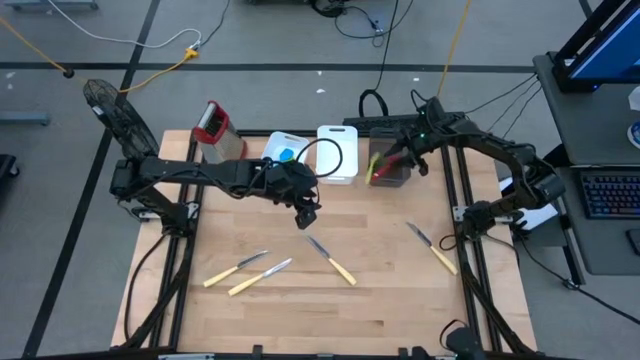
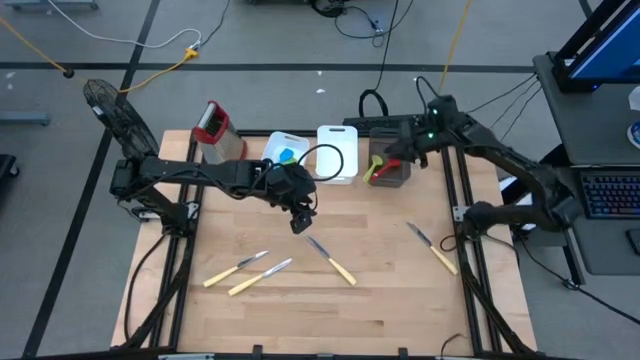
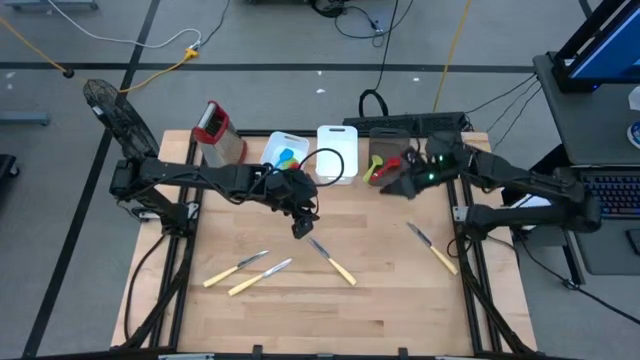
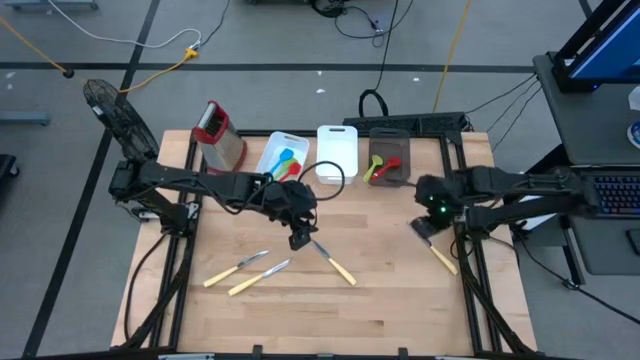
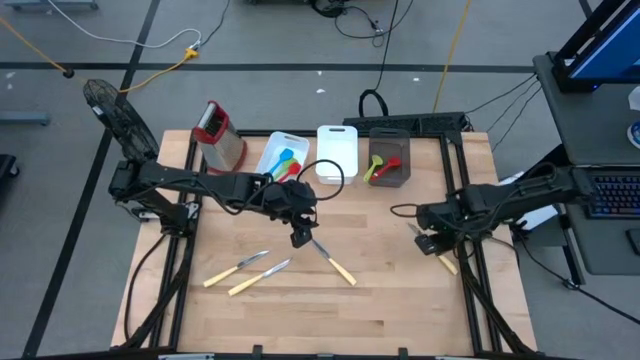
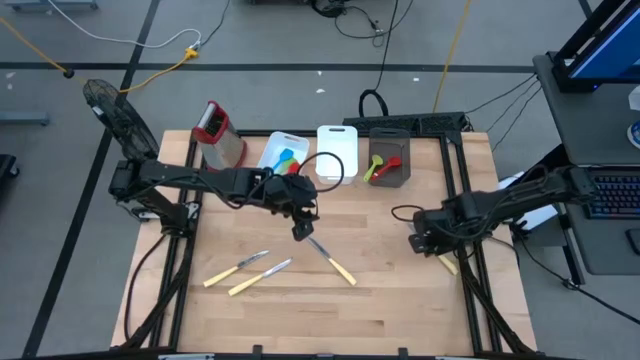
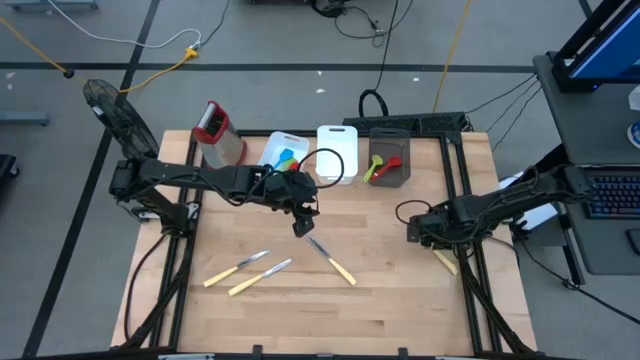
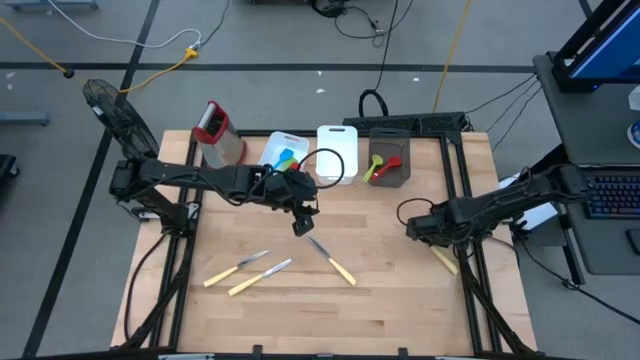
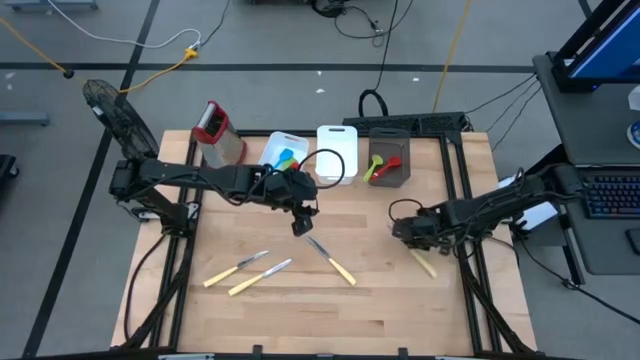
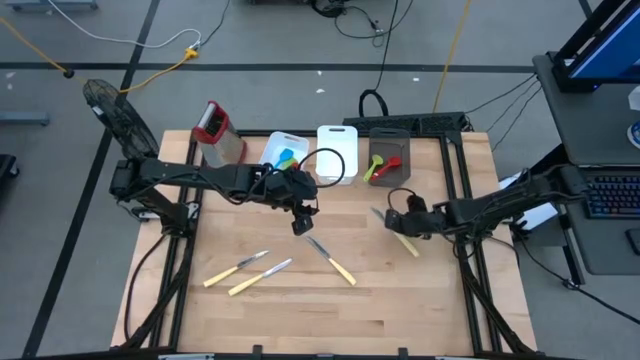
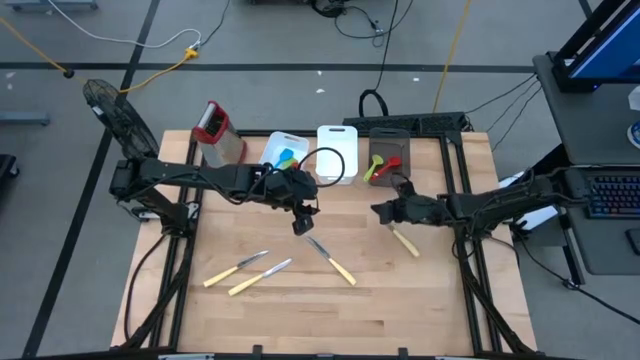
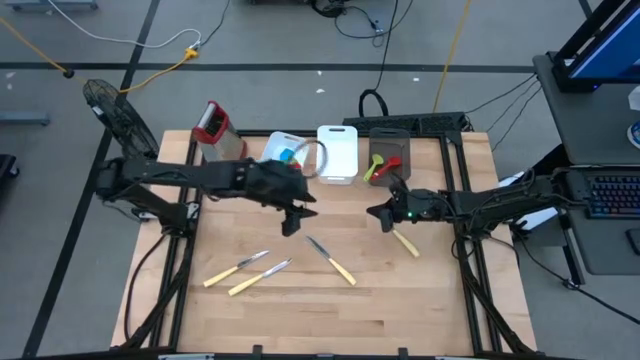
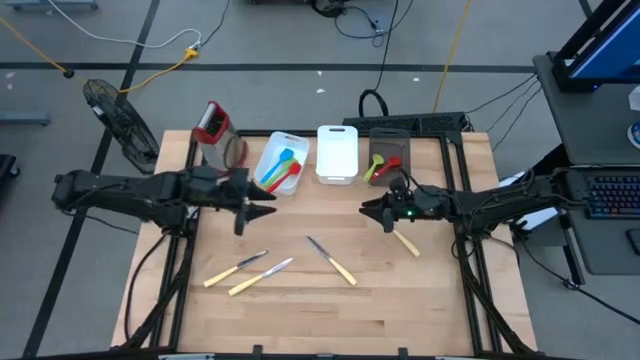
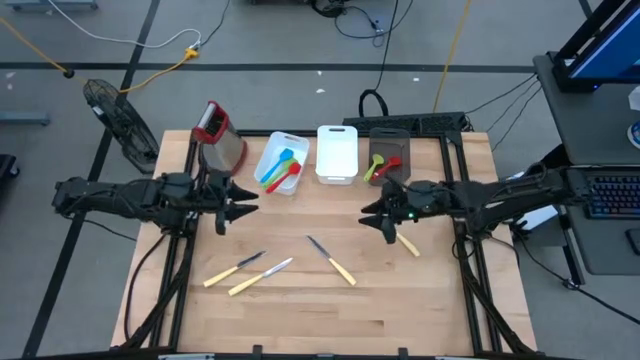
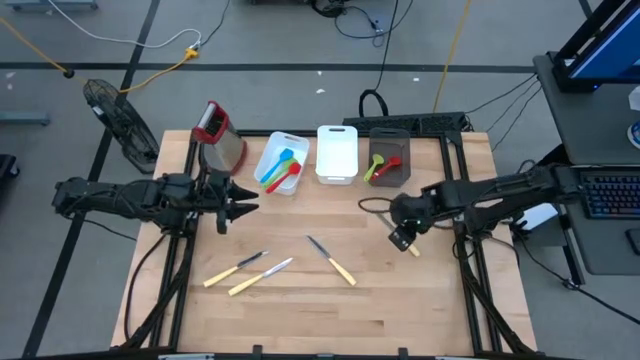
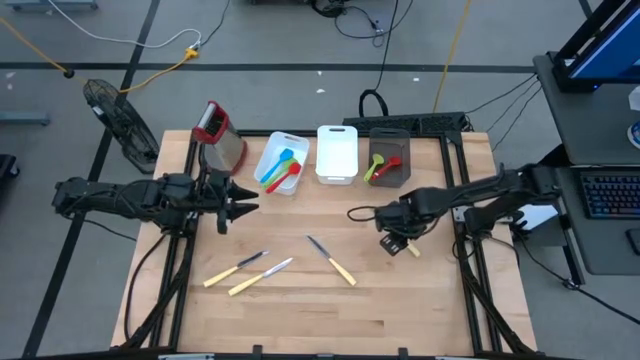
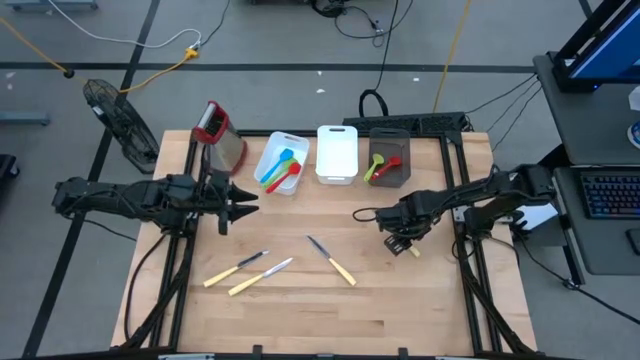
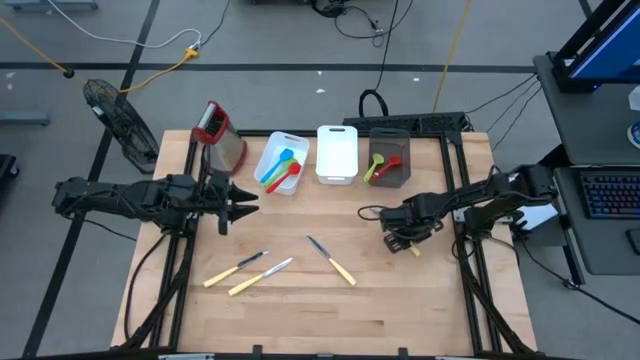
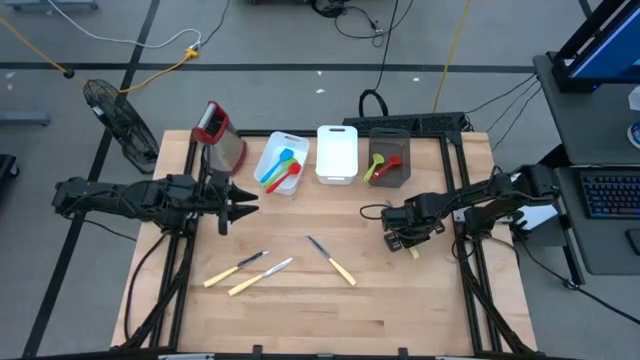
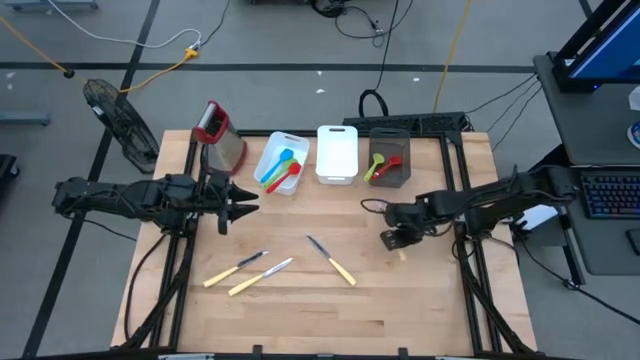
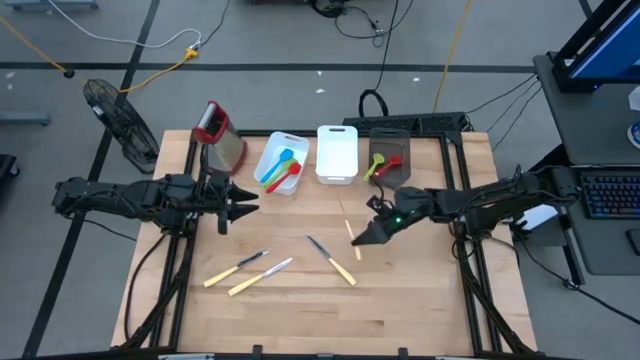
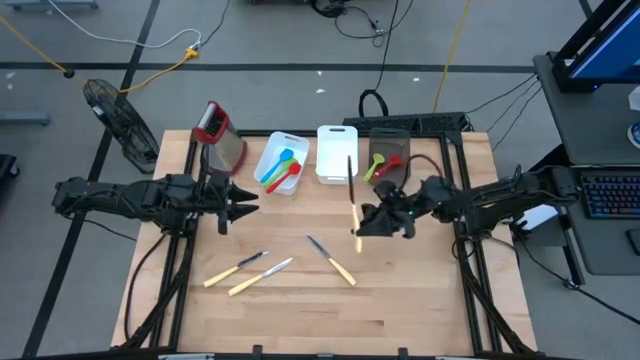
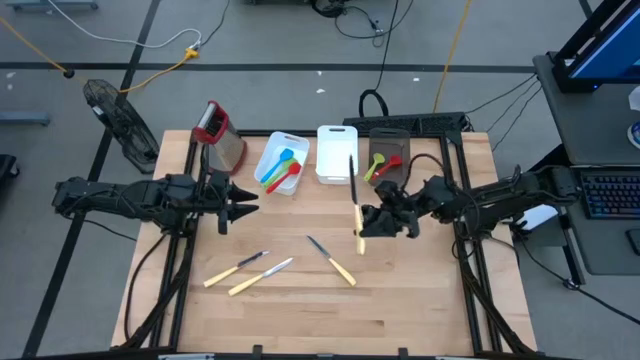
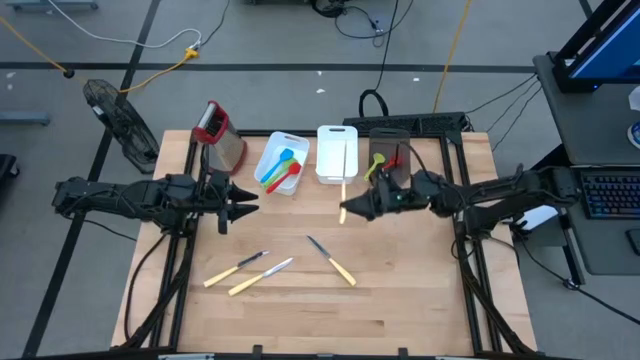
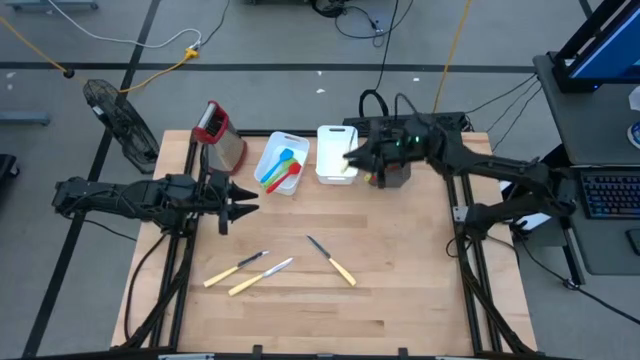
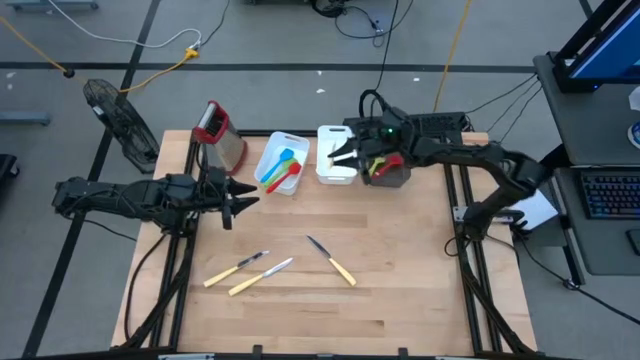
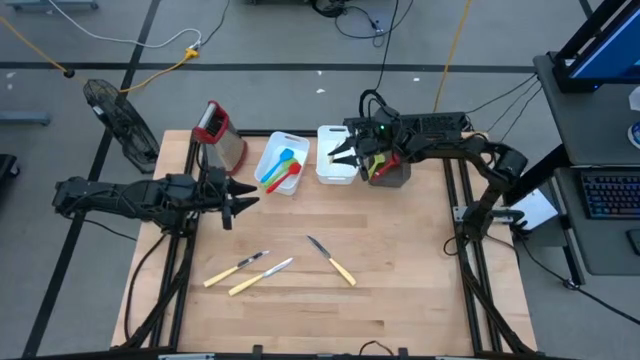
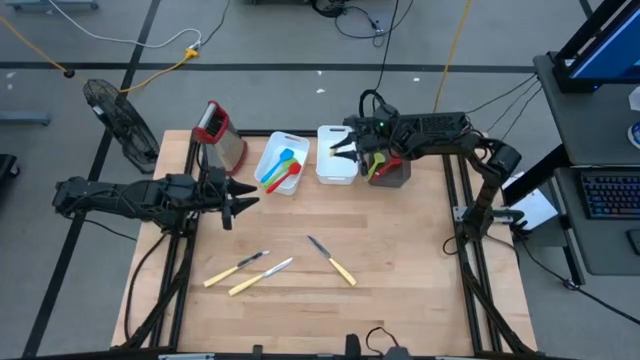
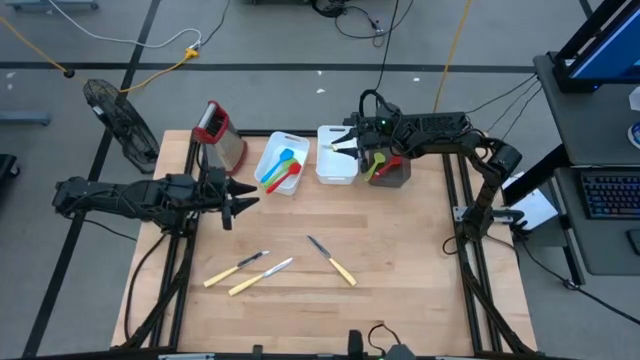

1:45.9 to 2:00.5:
Task: Pick & Place Kitchen Items
Put the yellow knife into the right white bin

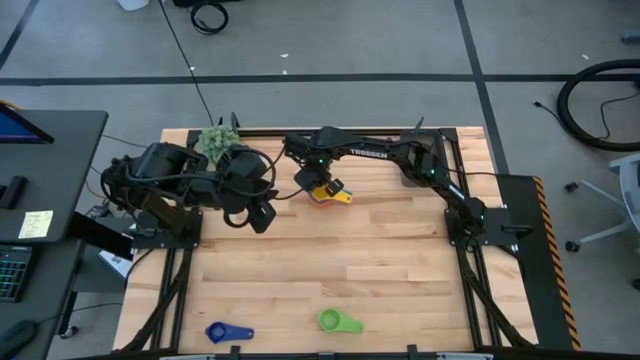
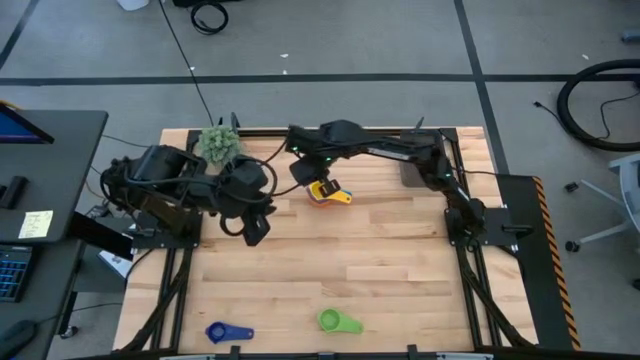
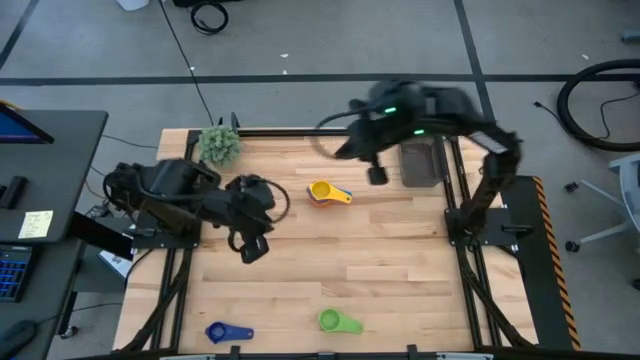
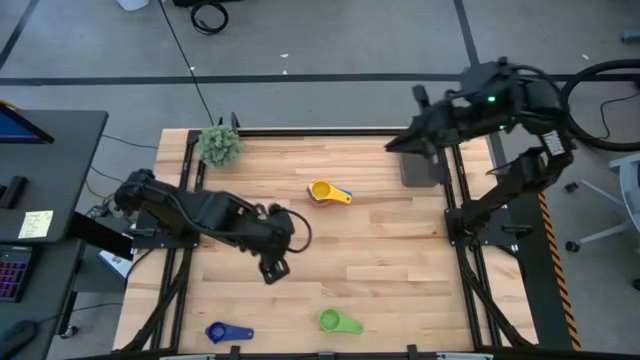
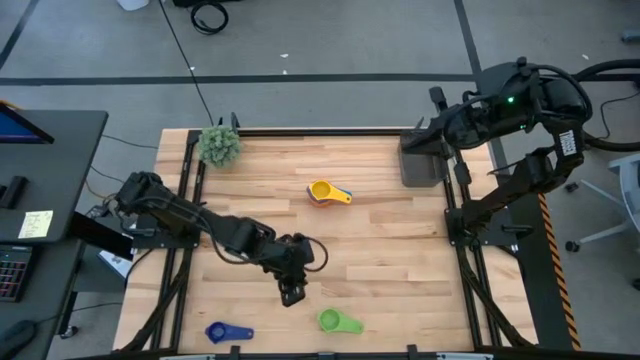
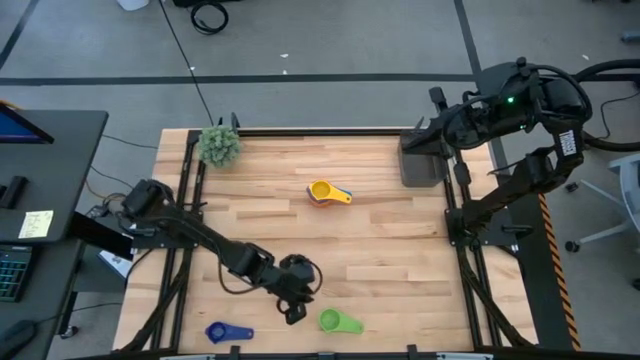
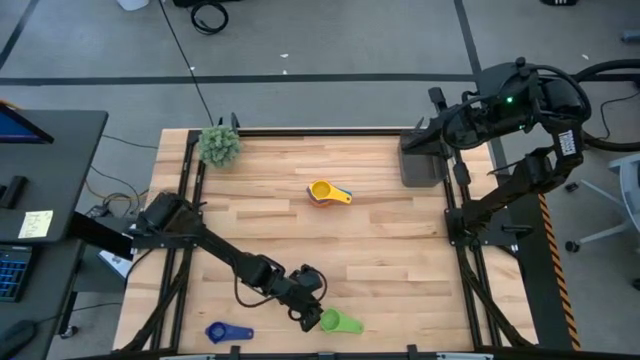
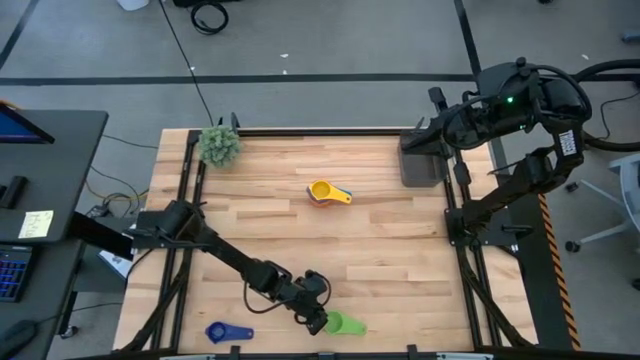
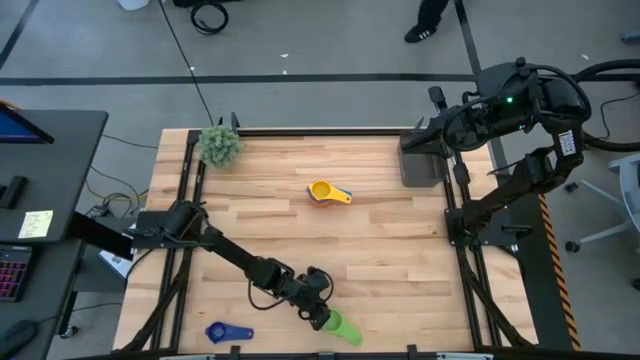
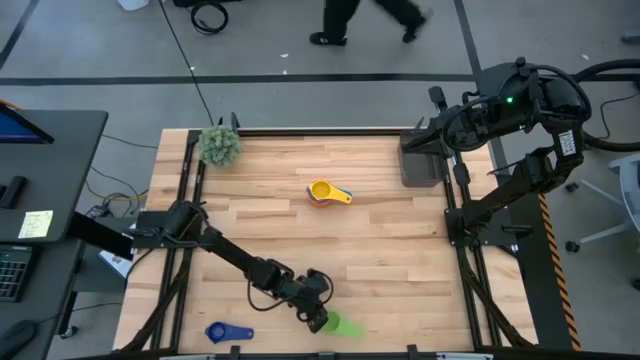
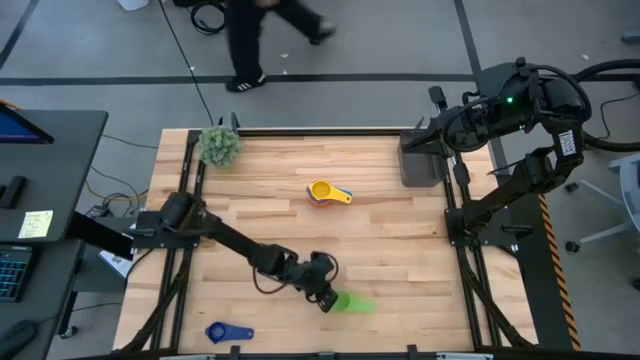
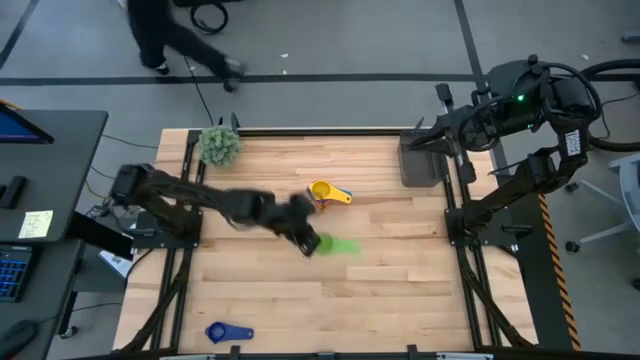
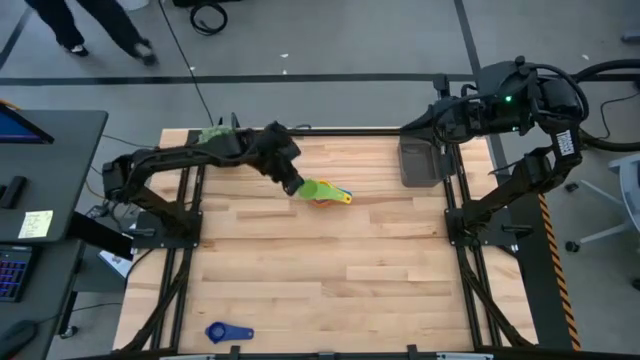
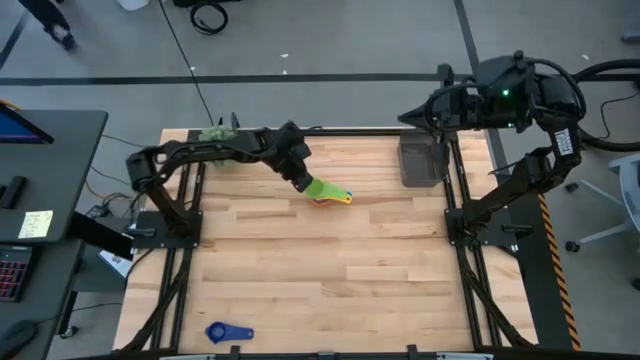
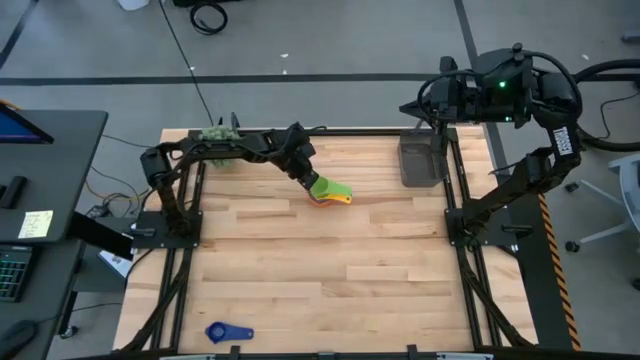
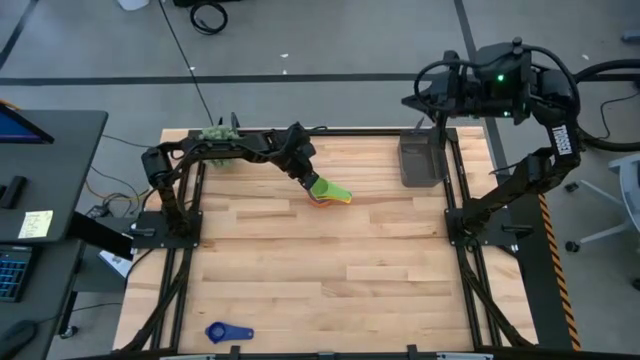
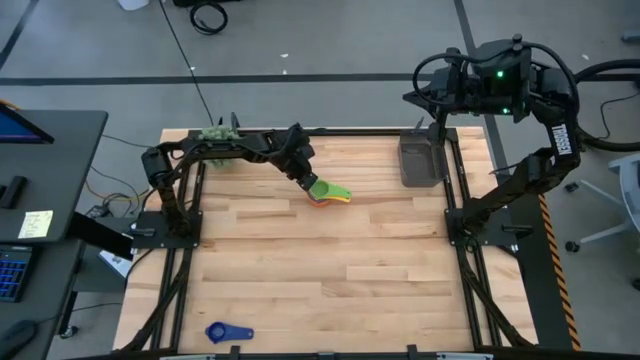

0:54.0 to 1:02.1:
Task: Nest measuring cups in basket
Stack the green measuring cup on top of the yellow measuring cup
